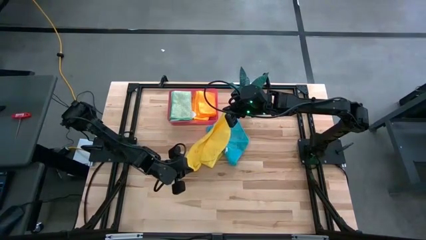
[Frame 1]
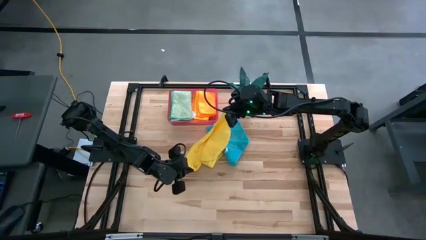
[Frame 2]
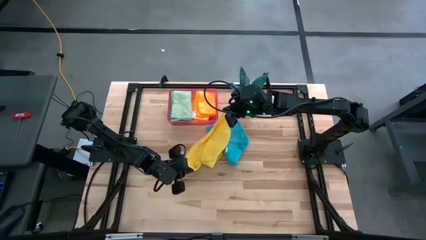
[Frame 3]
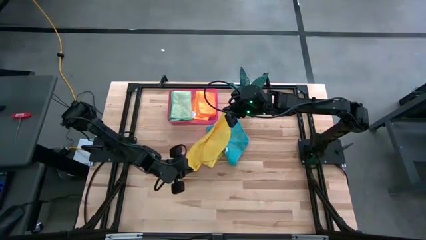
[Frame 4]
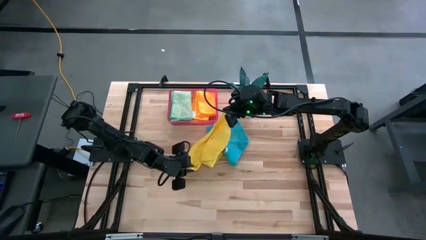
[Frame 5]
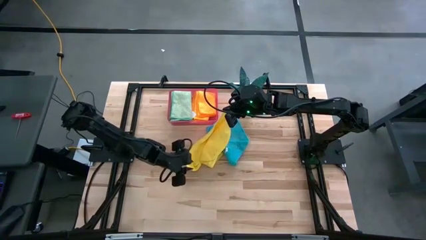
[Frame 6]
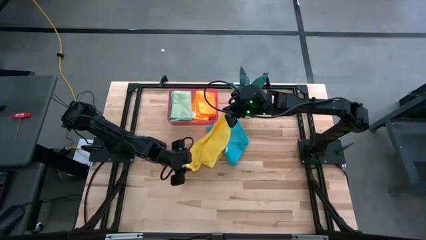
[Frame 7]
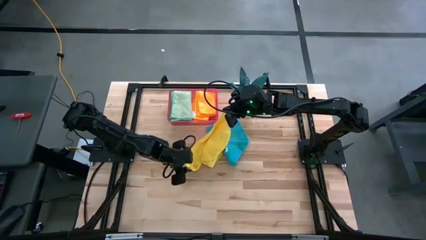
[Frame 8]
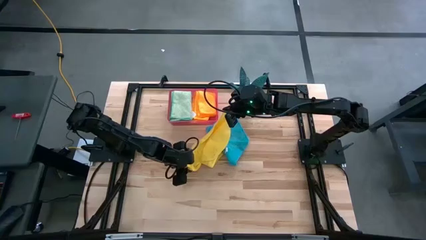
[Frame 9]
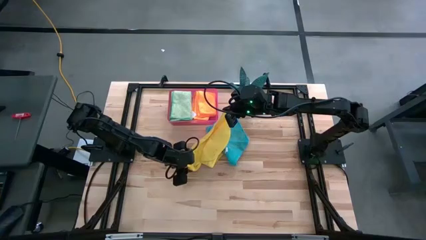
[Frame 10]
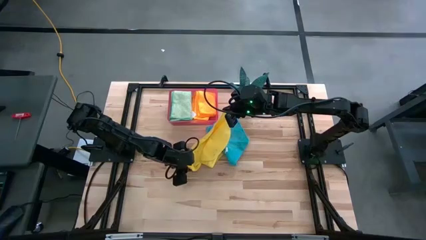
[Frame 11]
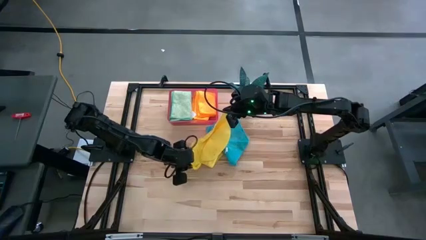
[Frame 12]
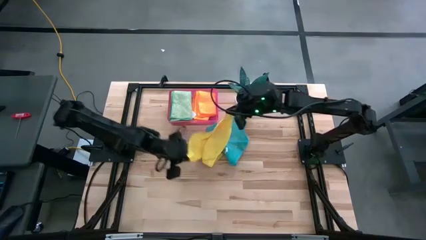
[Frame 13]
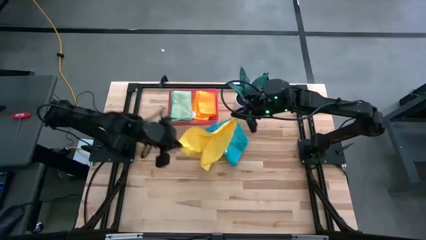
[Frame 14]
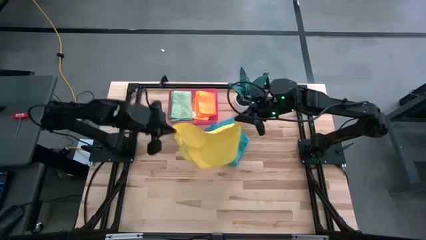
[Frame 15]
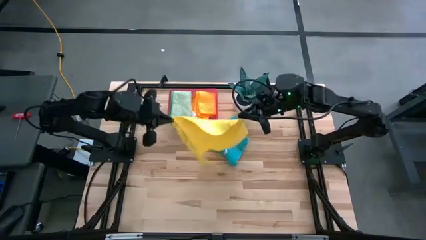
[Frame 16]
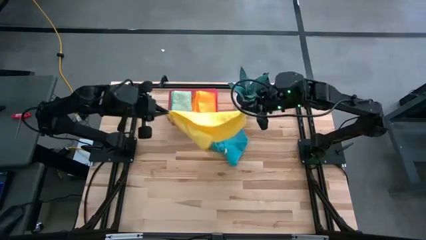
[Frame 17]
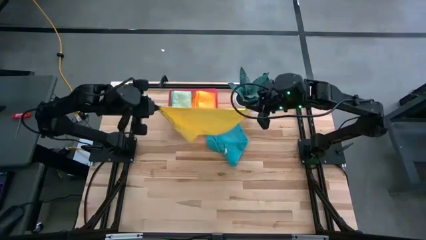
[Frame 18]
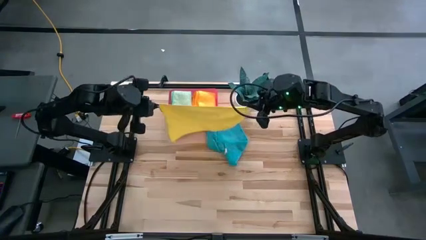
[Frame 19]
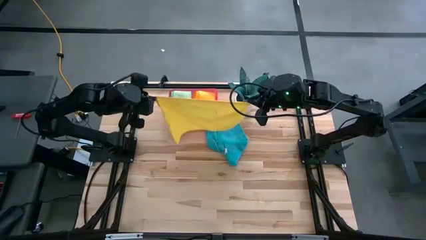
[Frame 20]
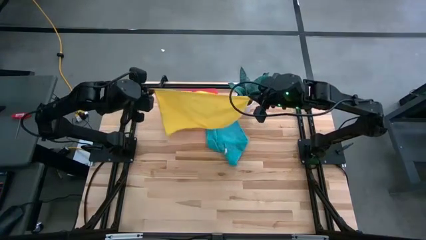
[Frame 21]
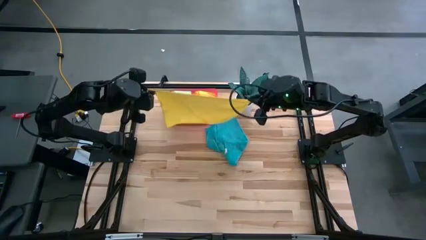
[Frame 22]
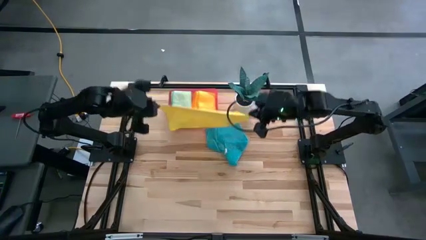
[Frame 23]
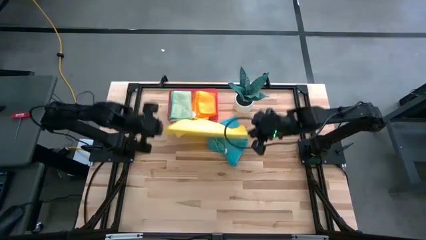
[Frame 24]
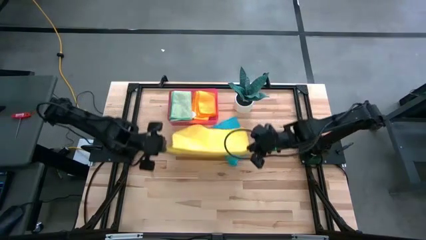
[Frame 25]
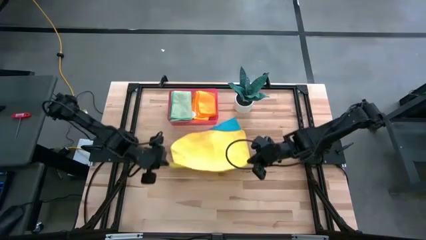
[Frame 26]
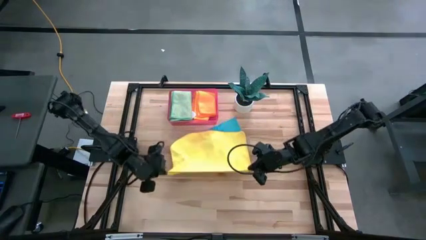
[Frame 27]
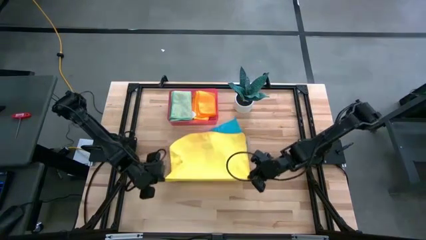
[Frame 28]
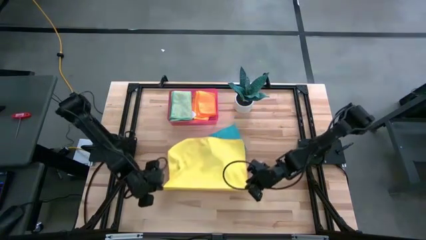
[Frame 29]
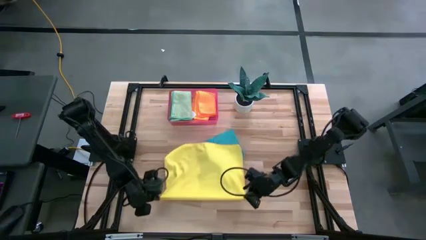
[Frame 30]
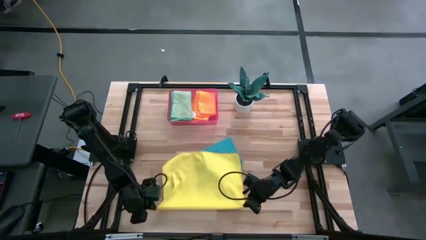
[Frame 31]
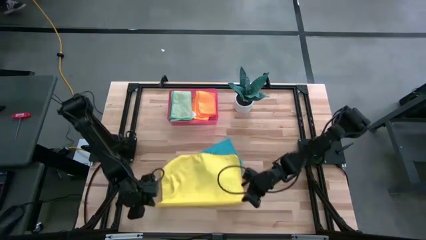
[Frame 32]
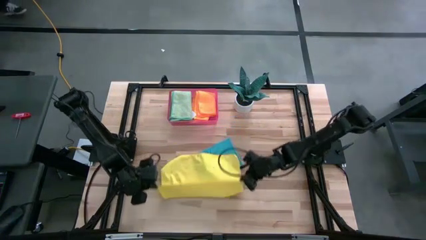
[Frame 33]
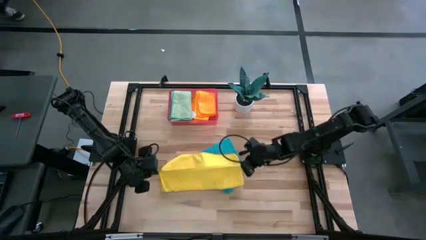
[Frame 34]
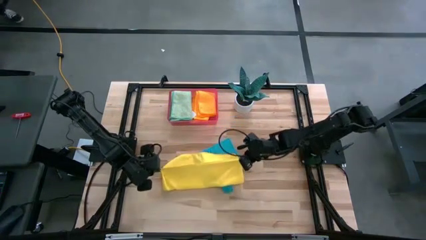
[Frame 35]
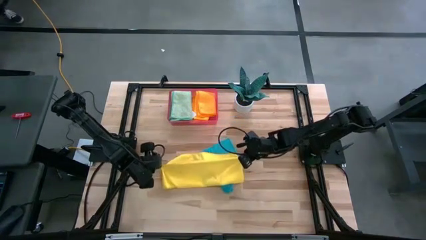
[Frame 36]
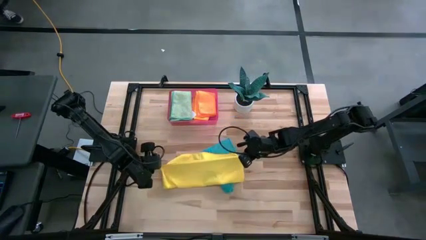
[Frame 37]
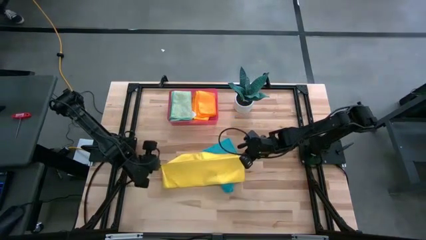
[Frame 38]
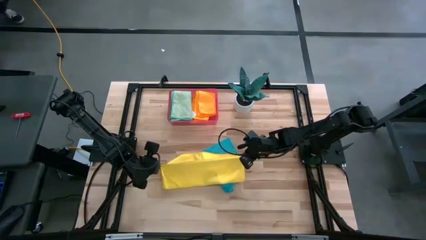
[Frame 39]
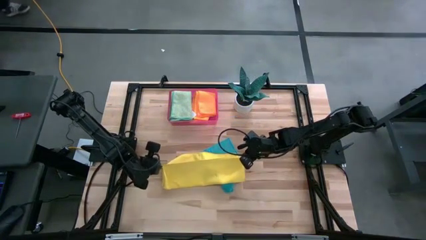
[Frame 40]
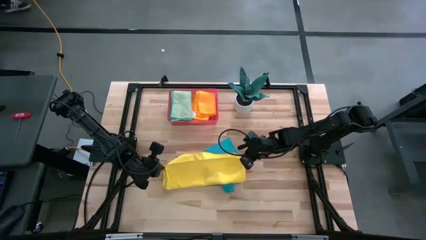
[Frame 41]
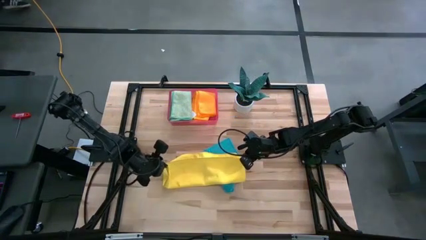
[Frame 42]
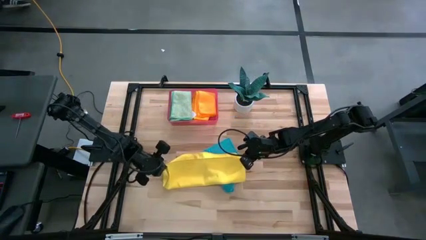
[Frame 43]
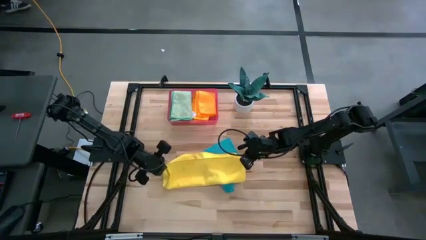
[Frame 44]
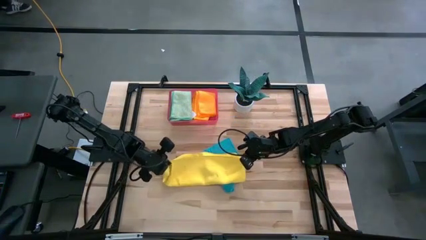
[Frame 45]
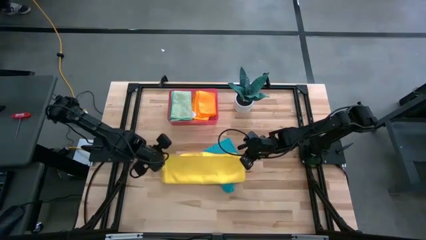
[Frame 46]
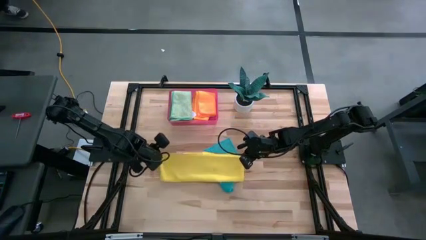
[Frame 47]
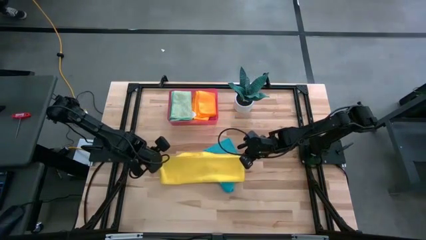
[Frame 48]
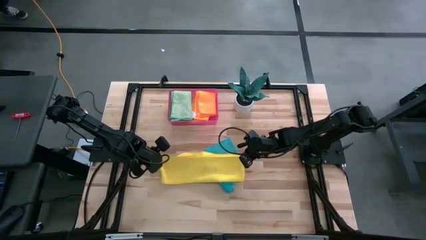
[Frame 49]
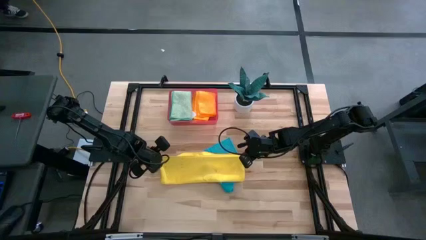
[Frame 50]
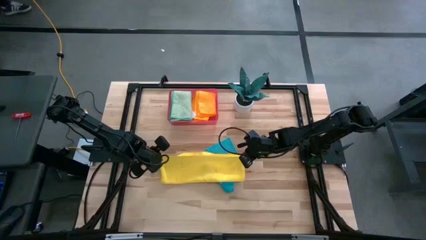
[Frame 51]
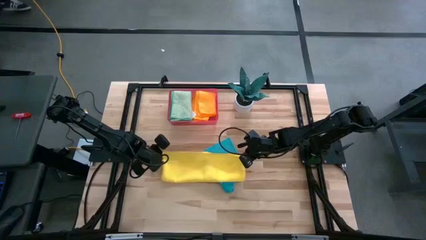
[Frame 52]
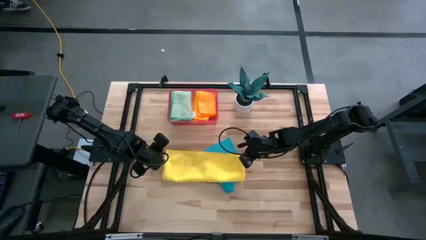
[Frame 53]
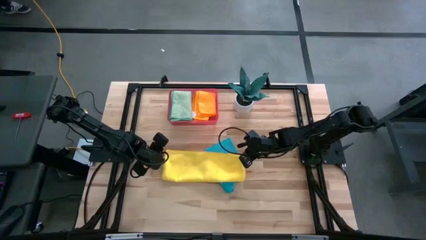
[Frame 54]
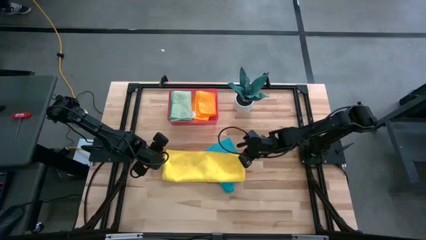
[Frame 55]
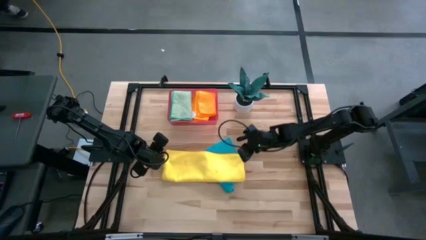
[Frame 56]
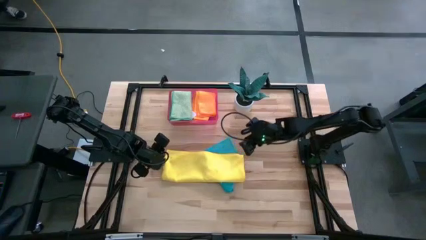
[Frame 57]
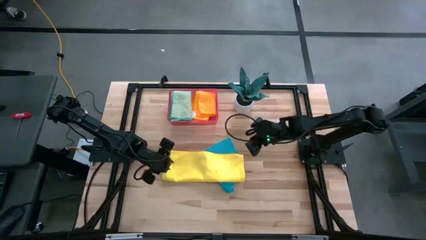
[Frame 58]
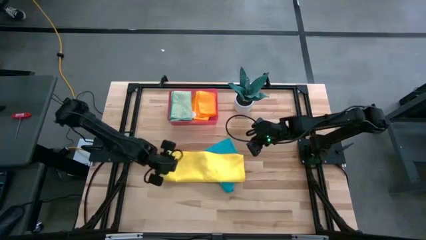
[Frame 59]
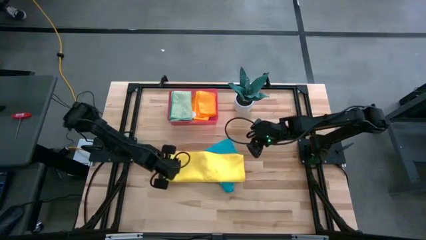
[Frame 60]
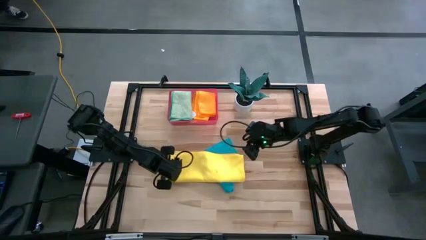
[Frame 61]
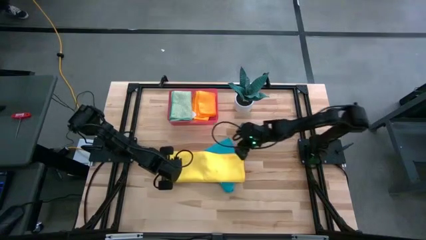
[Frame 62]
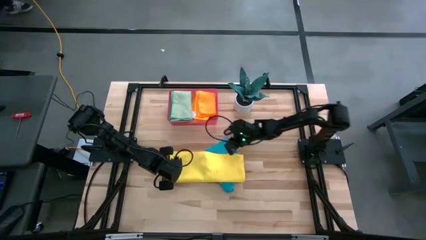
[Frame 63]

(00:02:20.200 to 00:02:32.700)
Task: Fold microfiber towels
Fold the yellow microfiber towel

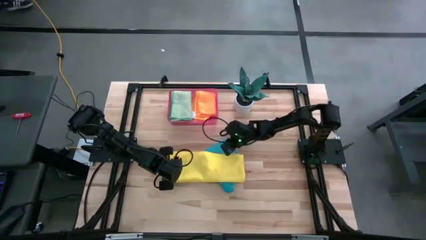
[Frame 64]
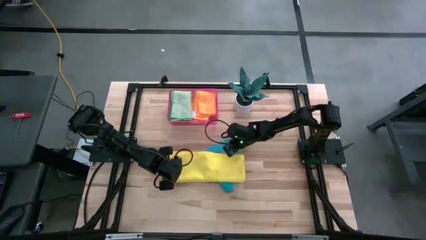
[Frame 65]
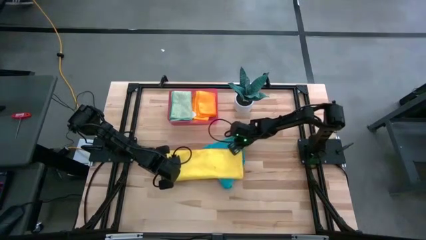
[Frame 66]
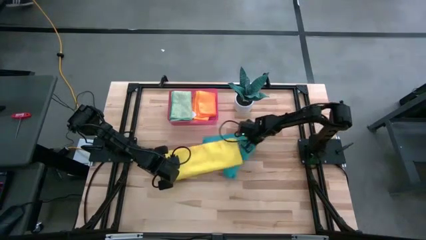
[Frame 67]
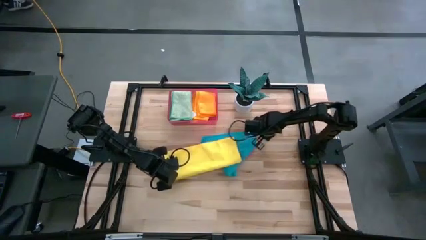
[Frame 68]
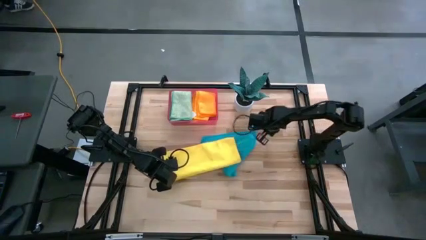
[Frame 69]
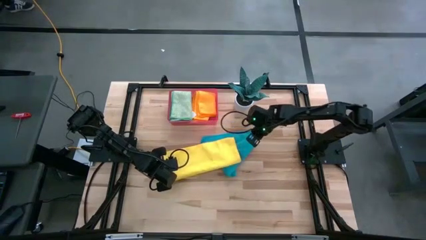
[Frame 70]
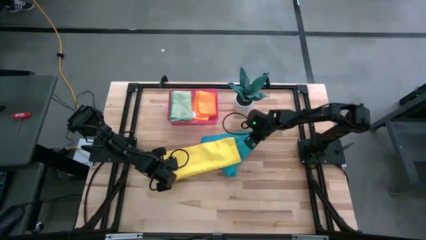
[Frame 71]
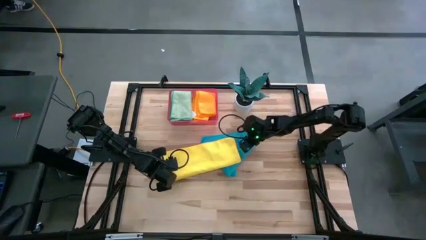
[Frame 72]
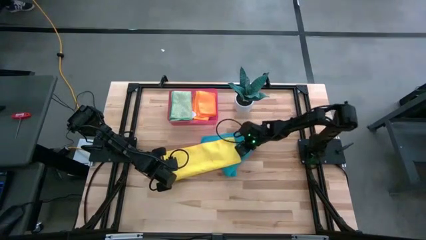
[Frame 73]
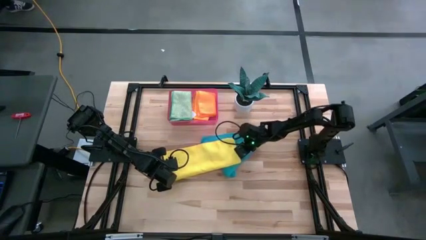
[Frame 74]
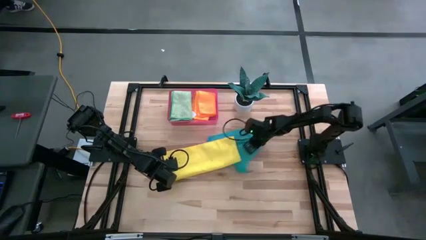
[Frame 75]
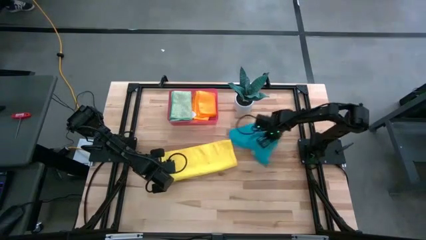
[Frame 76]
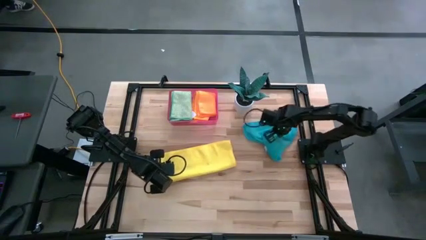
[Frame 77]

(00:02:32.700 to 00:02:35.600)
Adjust the blue microfiber towel
